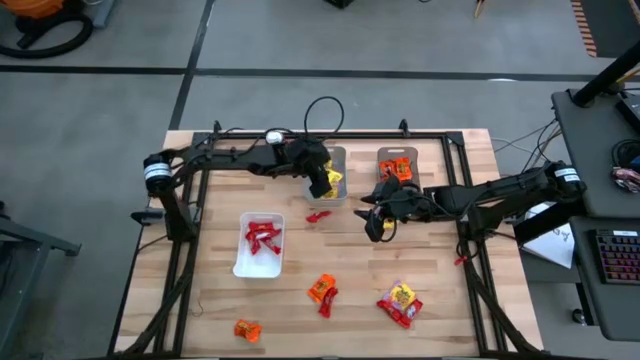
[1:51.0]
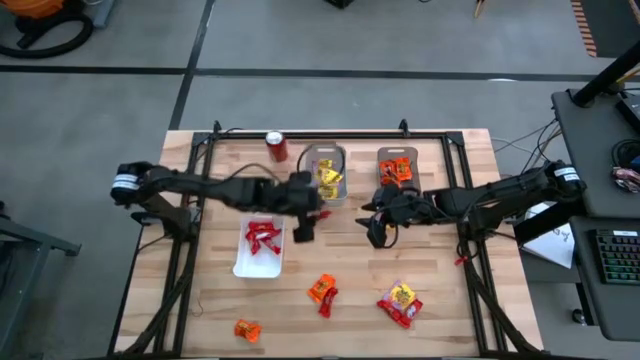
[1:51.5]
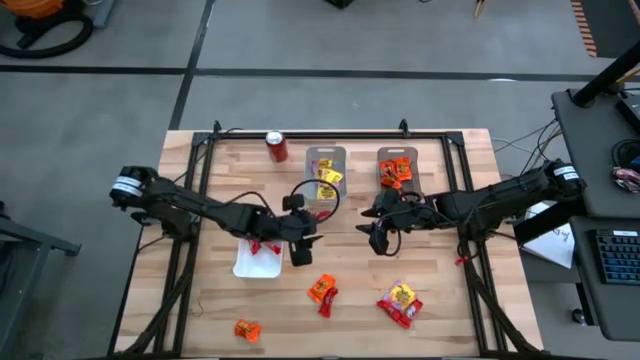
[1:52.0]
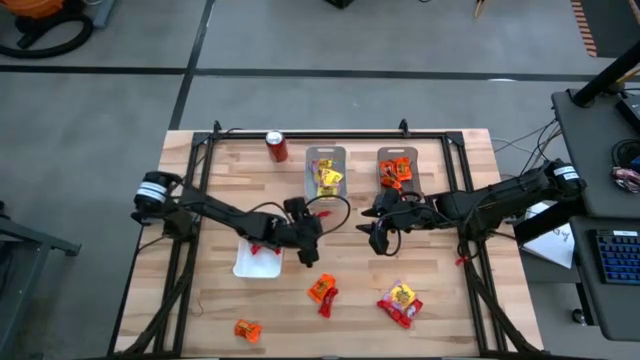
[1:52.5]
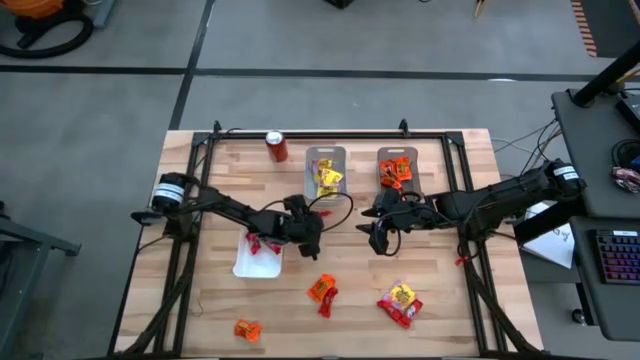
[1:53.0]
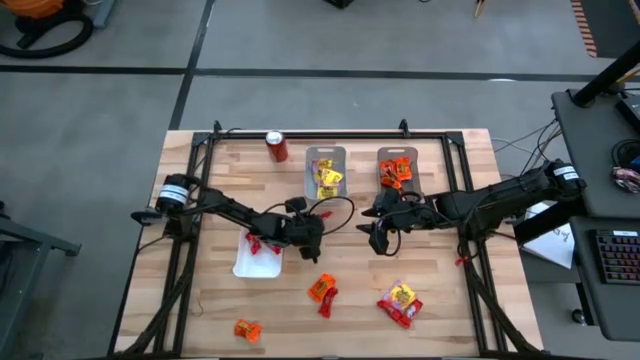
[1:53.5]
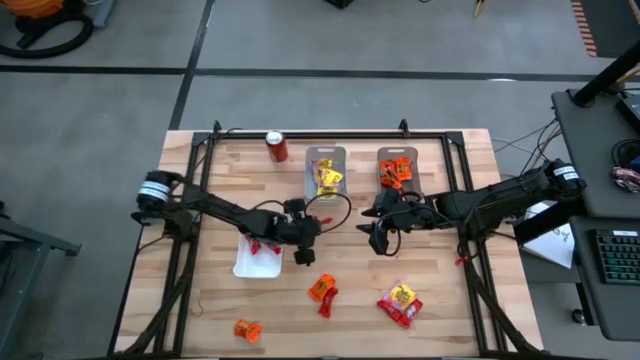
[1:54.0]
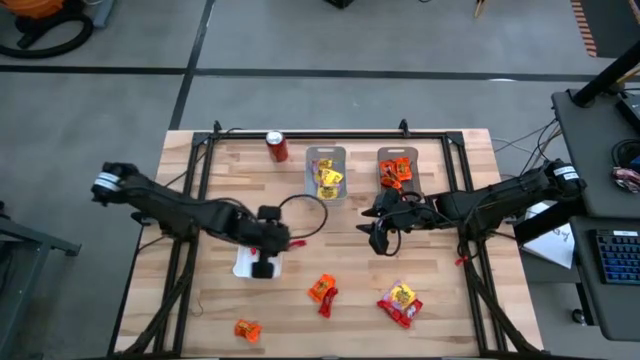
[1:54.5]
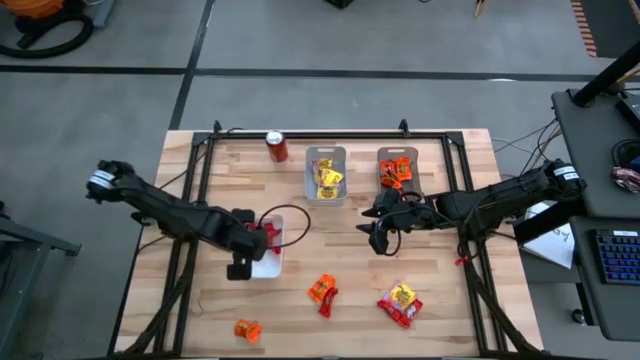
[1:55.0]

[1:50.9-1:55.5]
Task: Sort candy
Put the red candy into the white bin

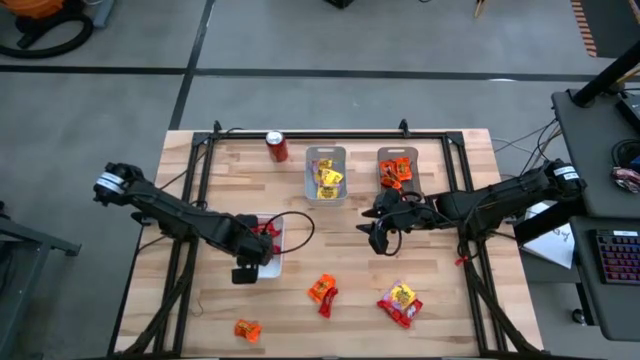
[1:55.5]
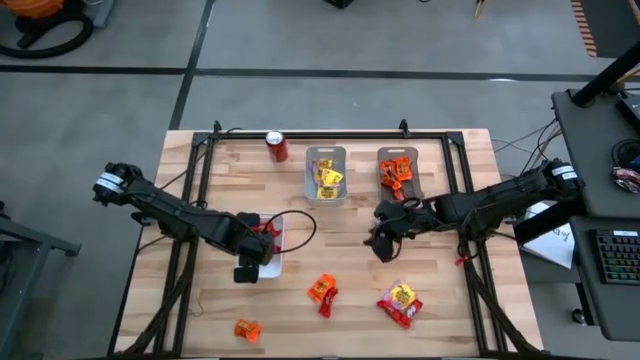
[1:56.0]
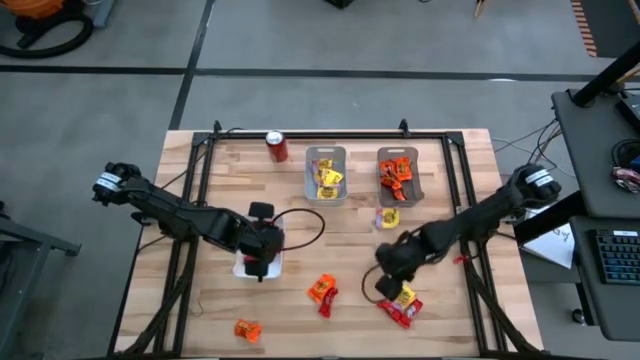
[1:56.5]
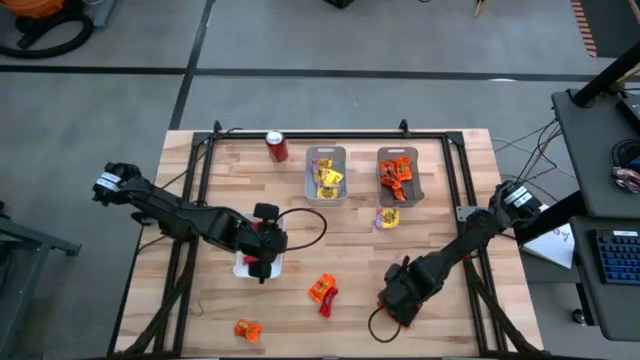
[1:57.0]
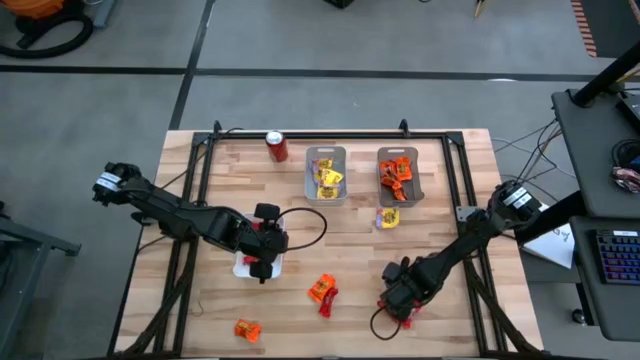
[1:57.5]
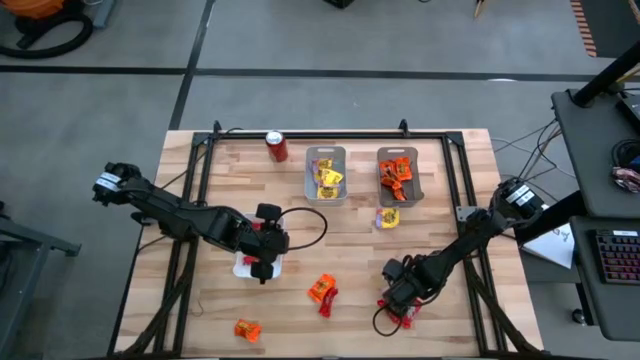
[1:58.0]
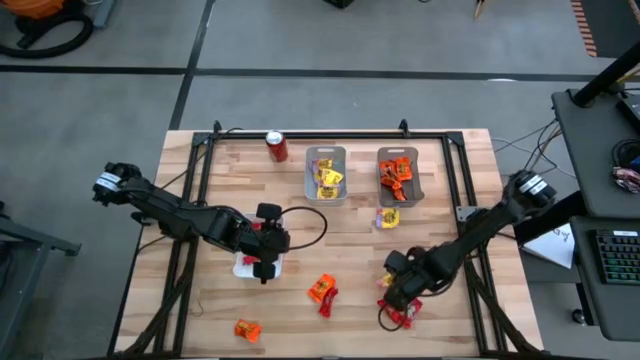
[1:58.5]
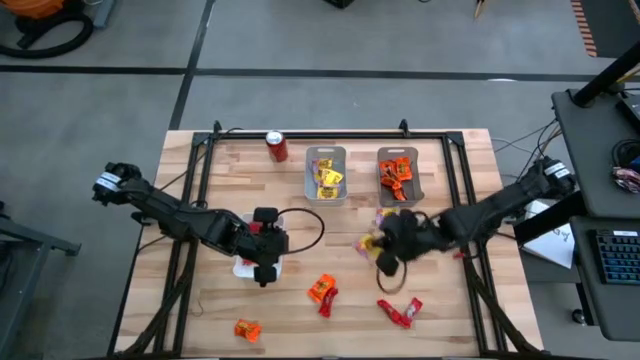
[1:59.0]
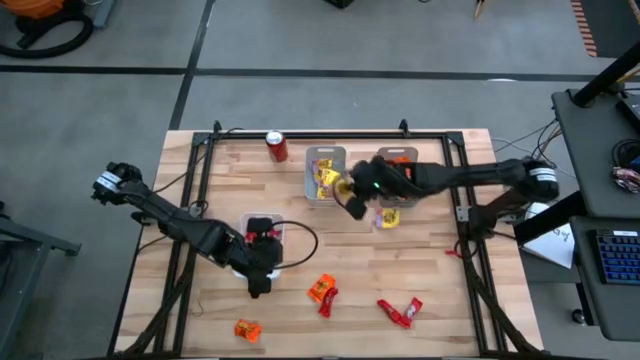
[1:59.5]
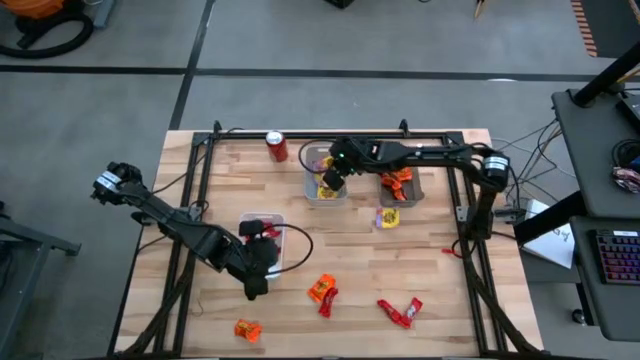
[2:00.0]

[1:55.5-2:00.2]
Put the yellow candy into the gray bin

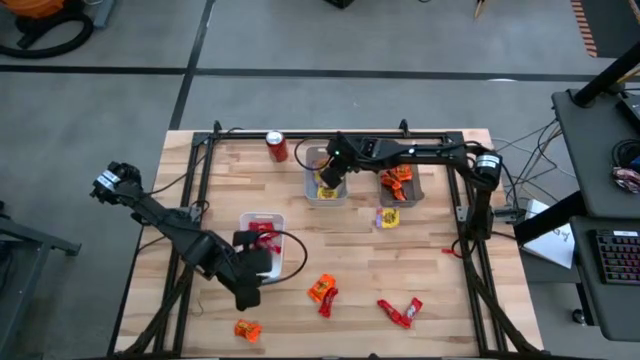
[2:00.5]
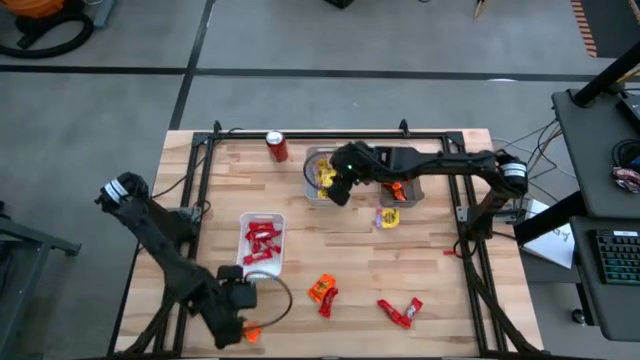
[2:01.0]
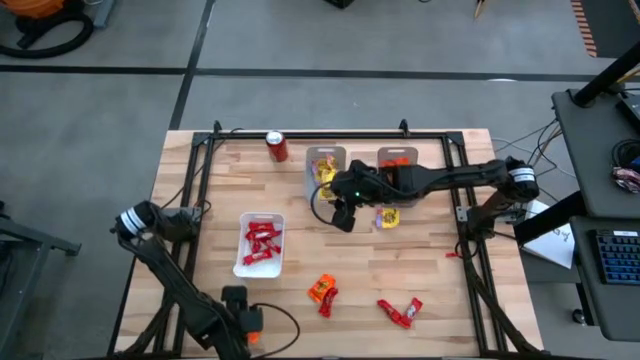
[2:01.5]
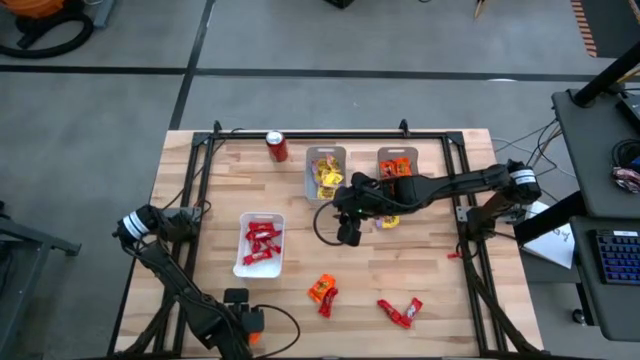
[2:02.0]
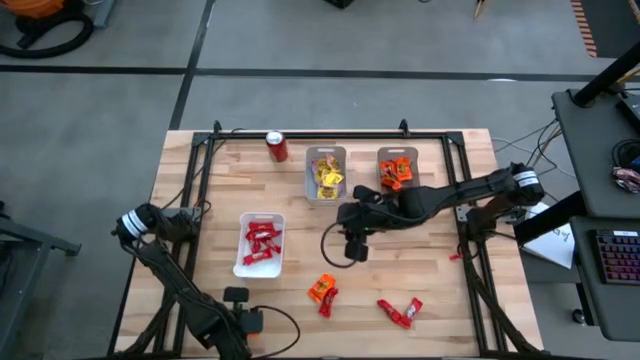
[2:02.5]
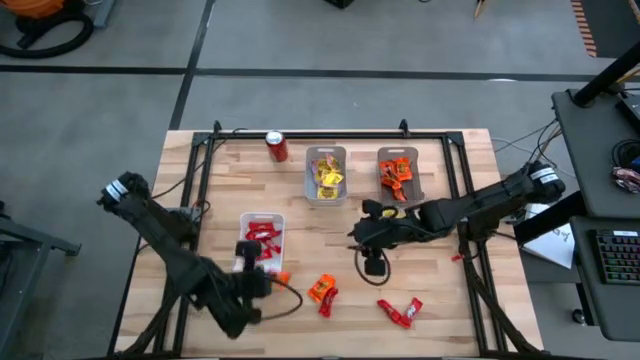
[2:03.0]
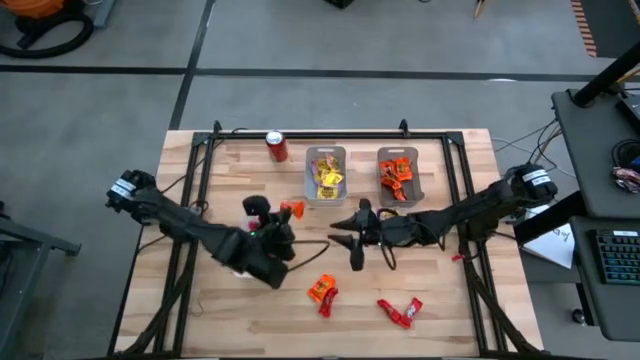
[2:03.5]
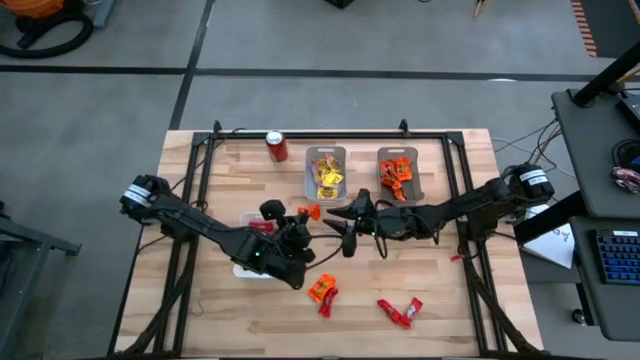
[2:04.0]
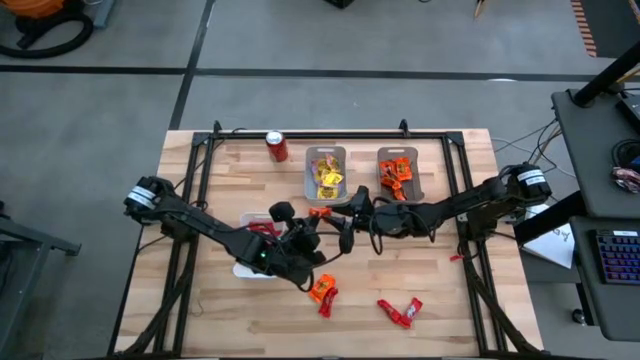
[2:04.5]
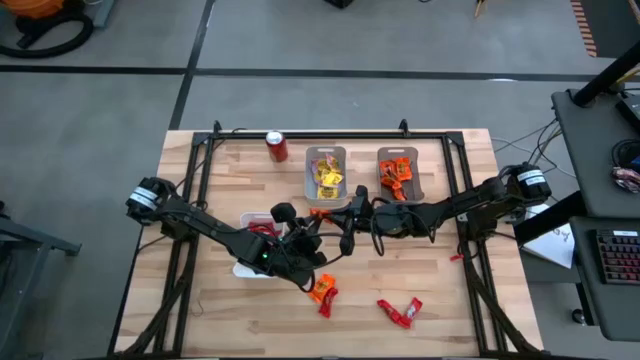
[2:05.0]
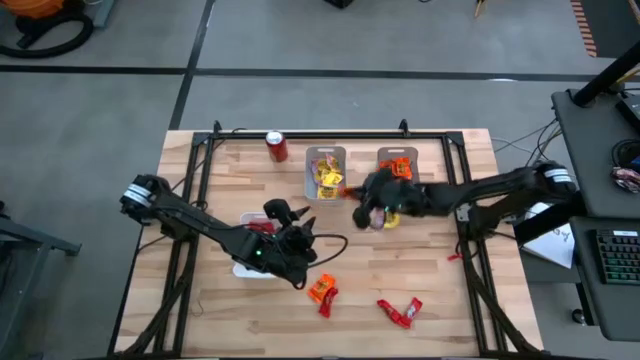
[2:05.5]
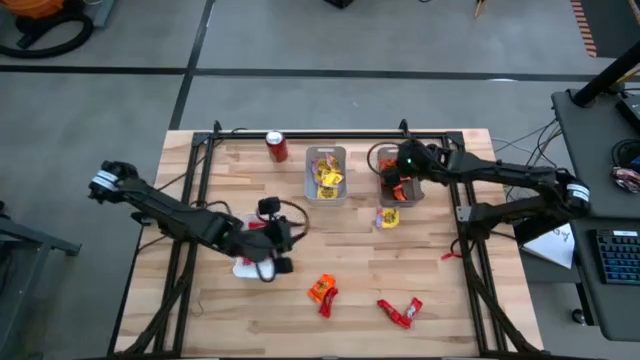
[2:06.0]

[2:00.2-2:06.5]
Put the orange candy into the black bin

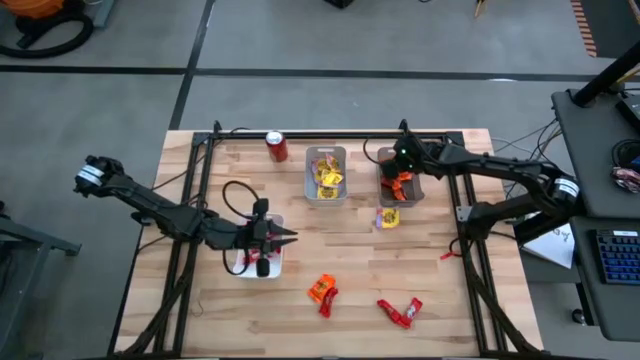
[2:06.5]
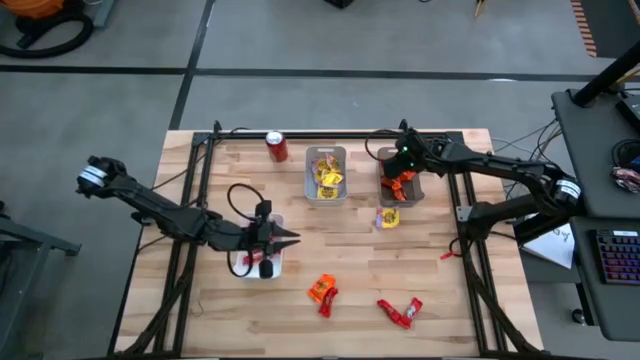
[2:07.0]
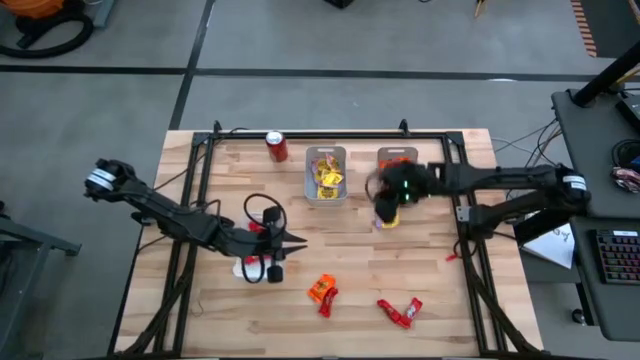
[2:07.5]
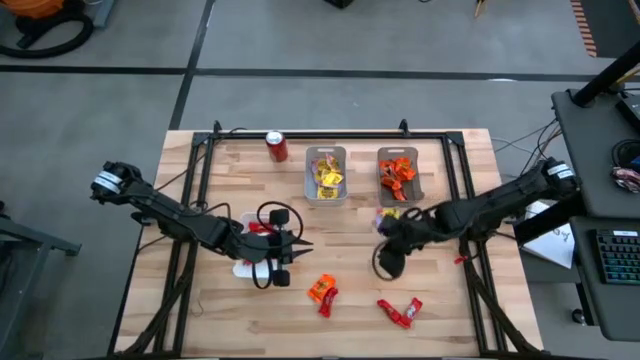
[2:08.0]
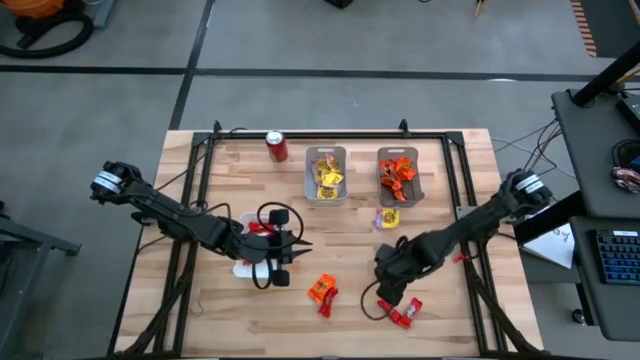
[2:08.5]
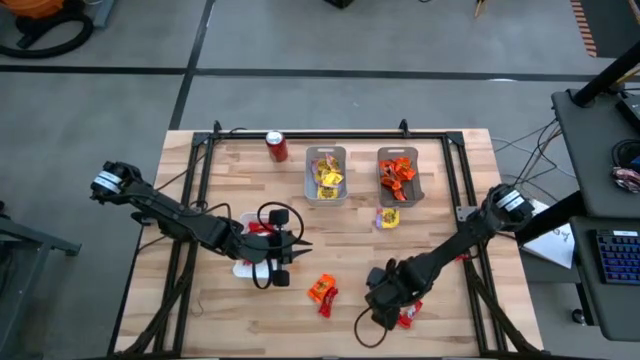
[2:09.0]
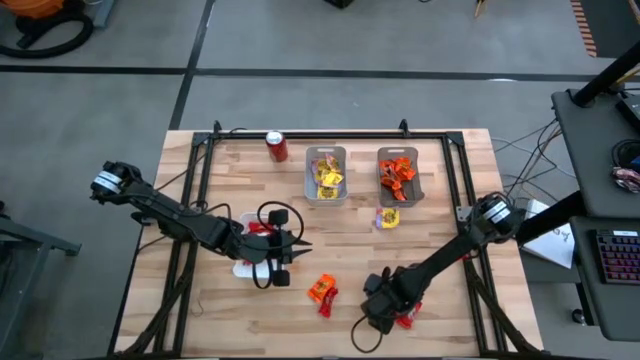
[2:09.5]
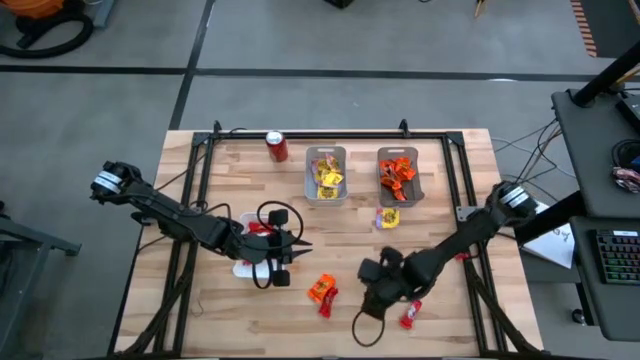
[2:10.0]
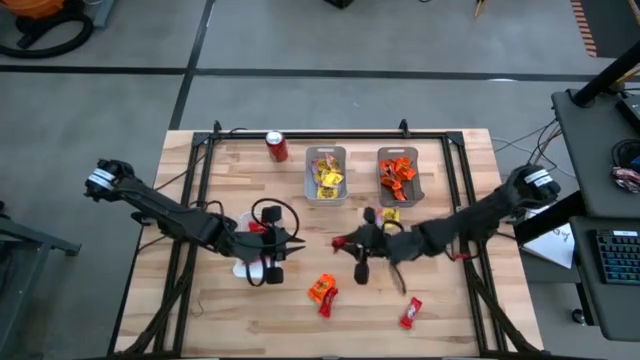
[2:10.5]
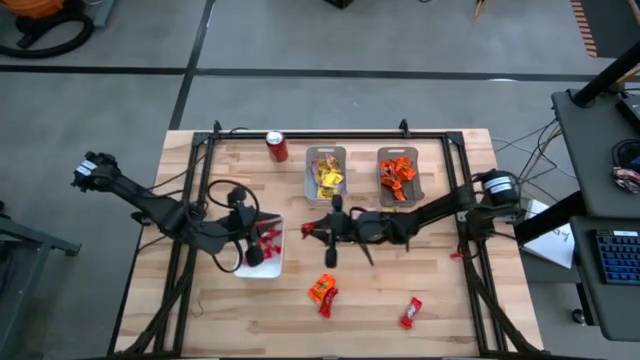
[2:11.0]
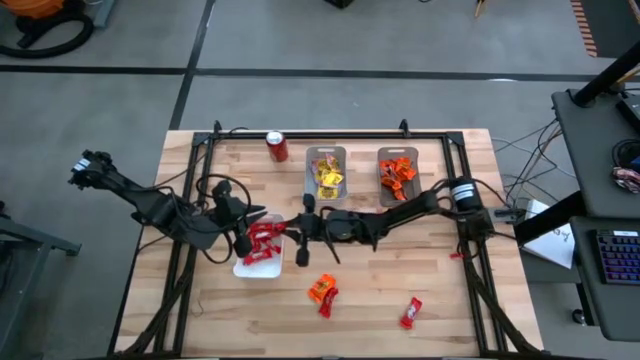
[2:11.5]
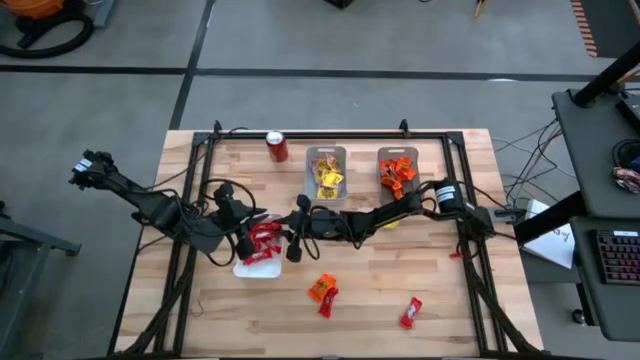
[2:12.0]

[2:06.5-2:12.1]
Put the red candy into the white bin
